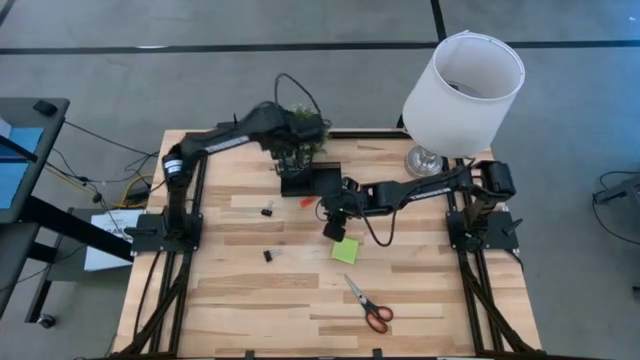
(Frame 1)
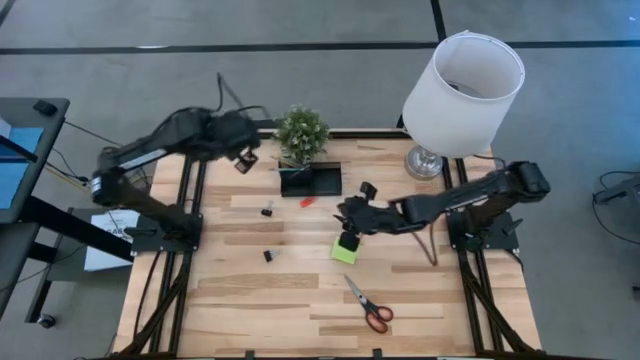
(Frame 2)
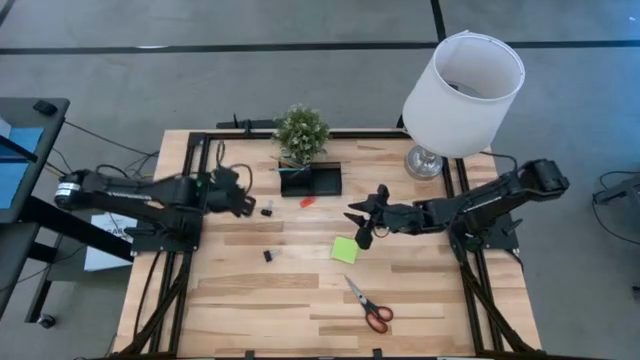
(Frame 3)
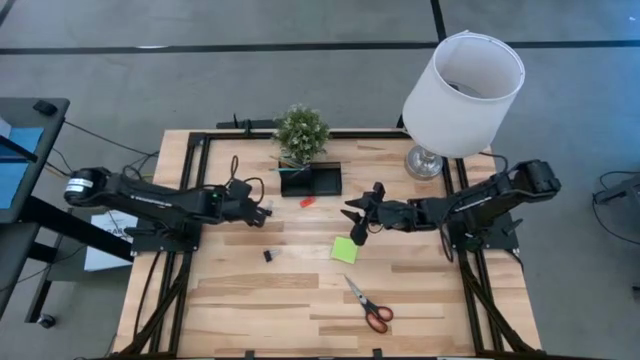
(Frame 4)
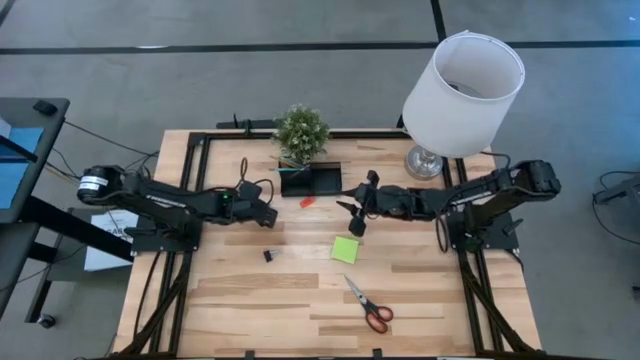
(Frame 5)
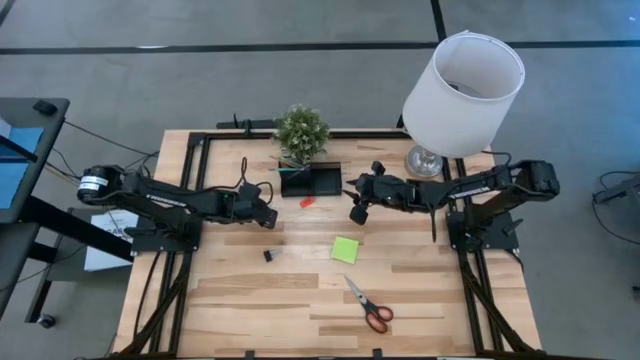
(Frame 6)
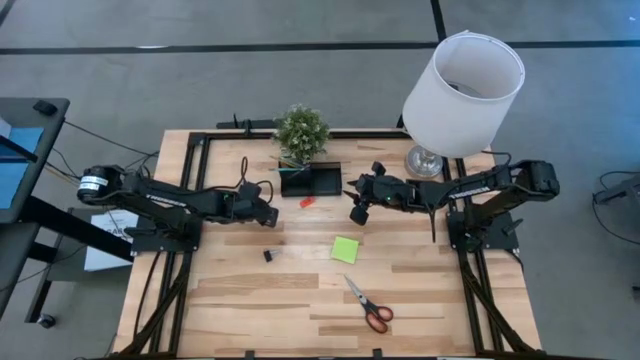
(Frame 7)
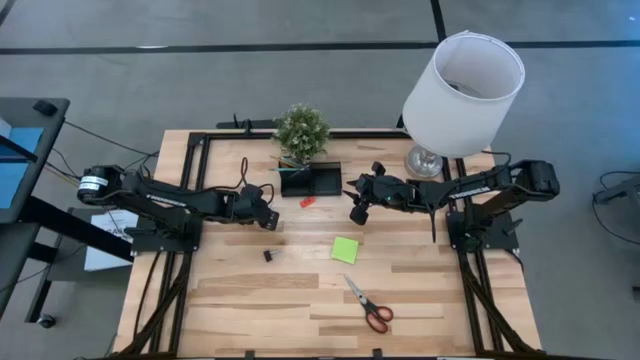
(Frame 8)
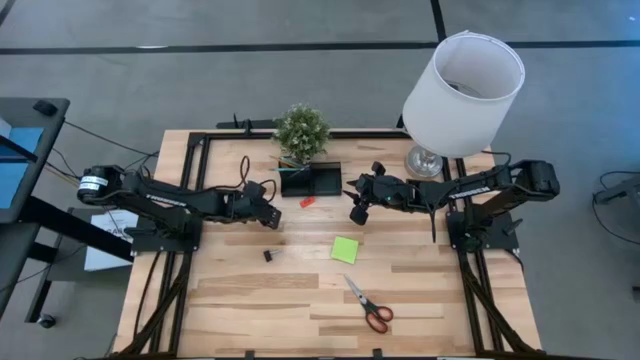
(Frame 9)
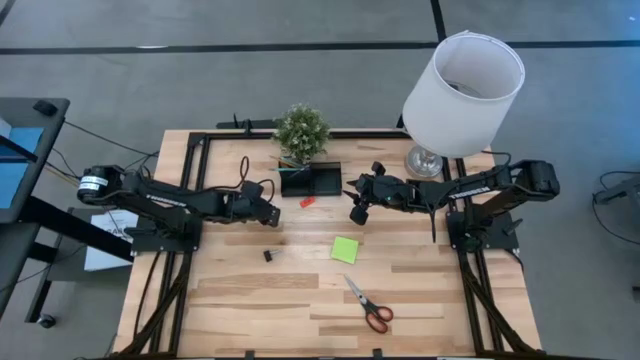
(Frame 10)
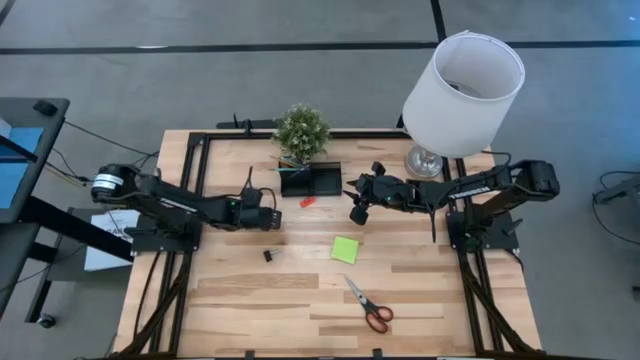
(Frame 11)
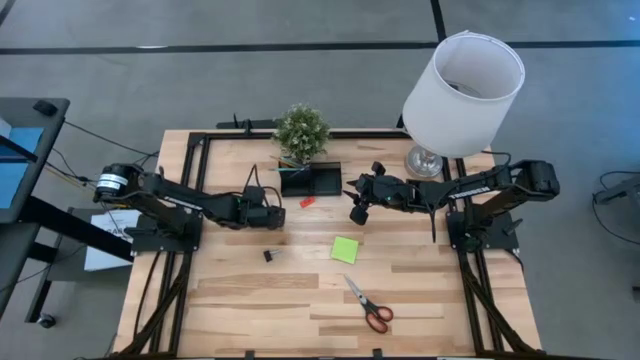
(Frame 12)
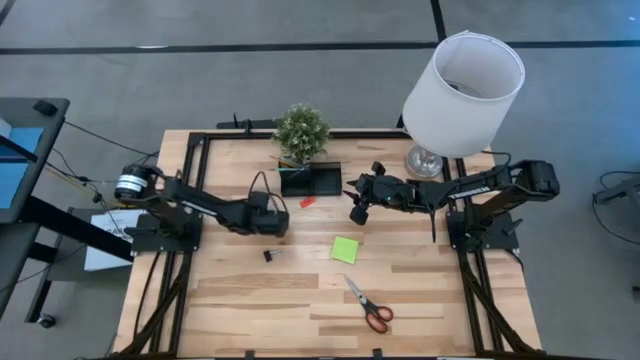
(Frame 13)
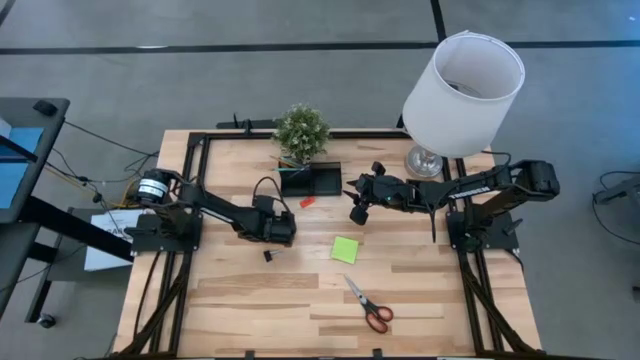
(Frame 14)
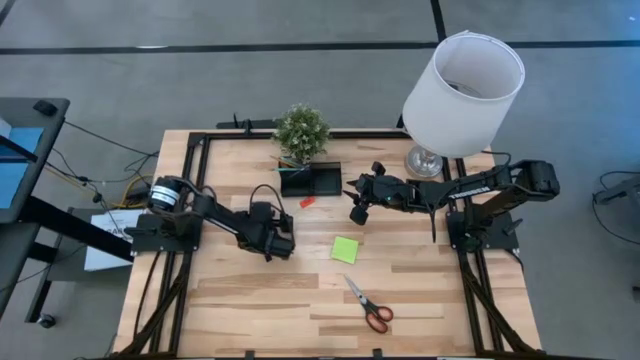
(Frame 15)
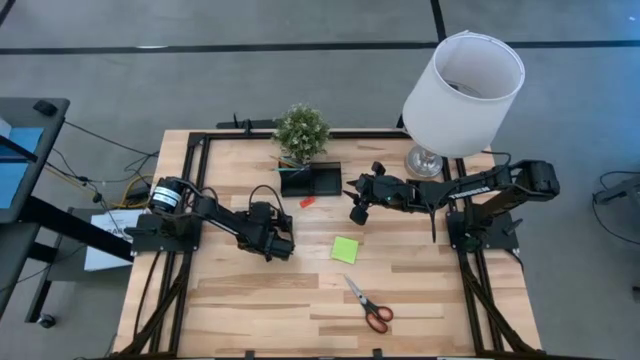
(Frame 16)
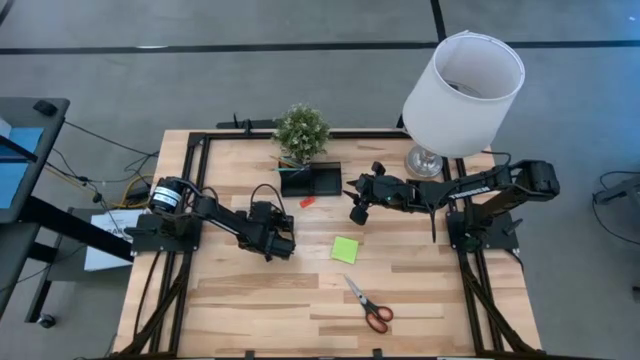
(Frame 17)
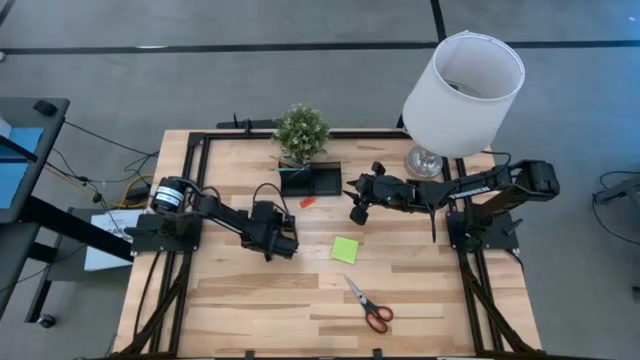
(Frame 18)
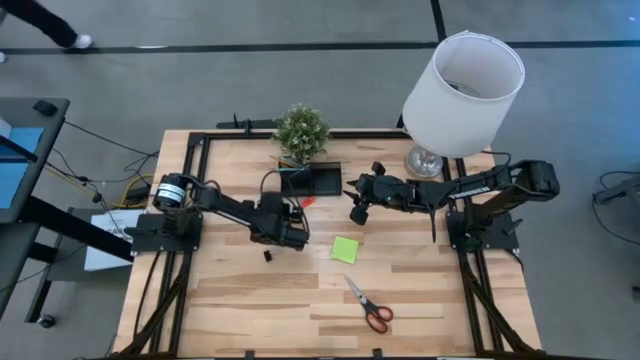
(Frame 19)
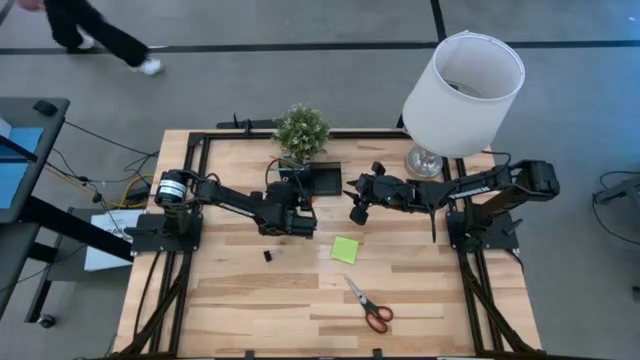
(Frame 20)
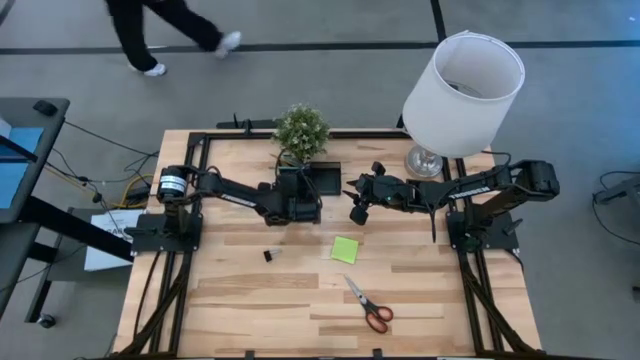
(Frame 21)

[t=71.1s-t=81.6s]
Task: Pick and place office supplies into organizer
Put the top black binder clip into the black organizer

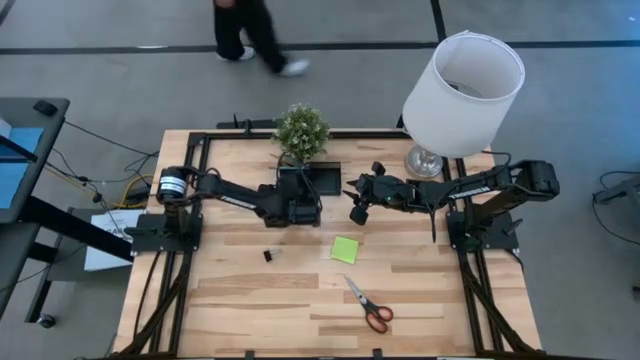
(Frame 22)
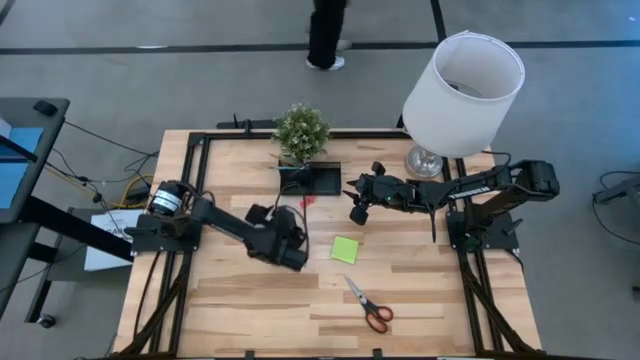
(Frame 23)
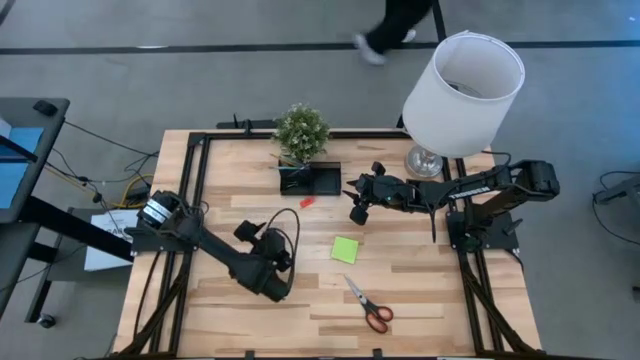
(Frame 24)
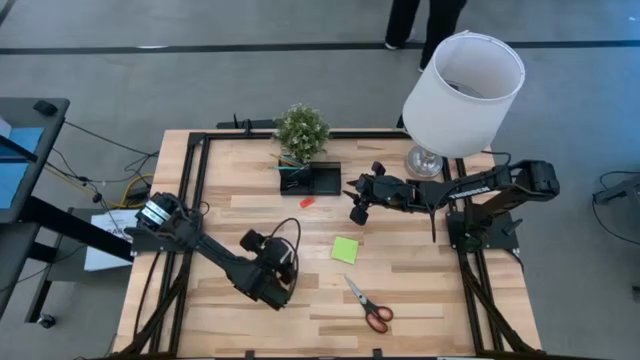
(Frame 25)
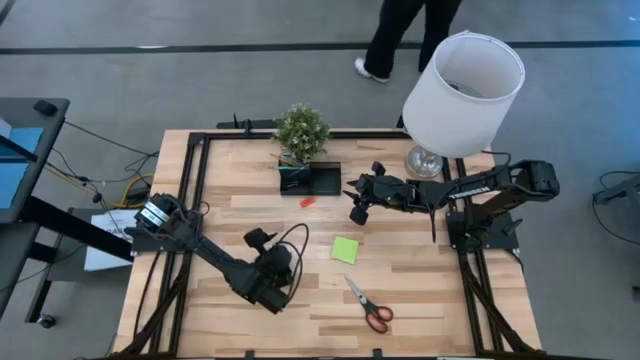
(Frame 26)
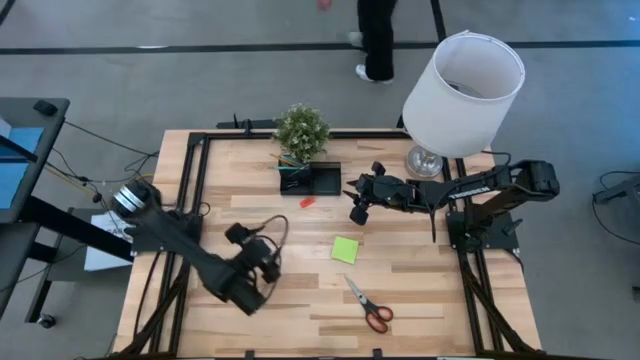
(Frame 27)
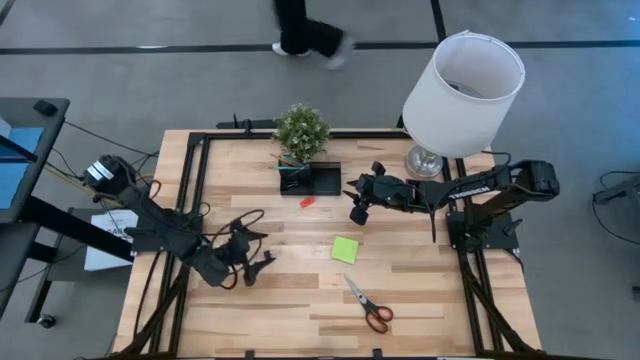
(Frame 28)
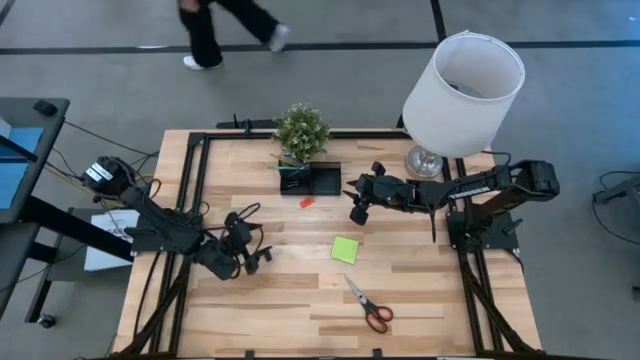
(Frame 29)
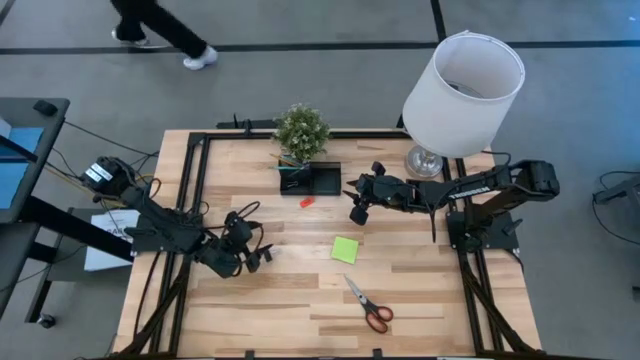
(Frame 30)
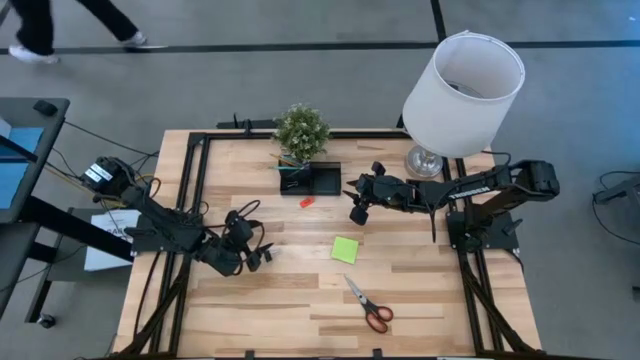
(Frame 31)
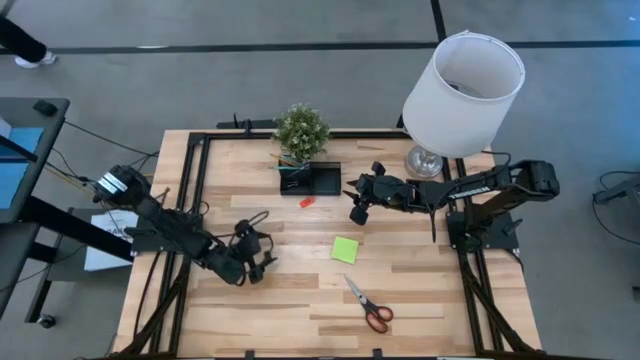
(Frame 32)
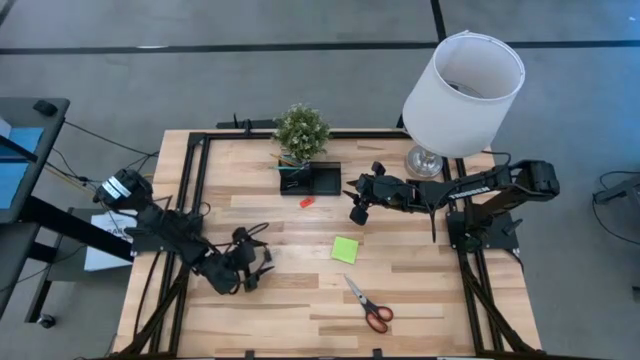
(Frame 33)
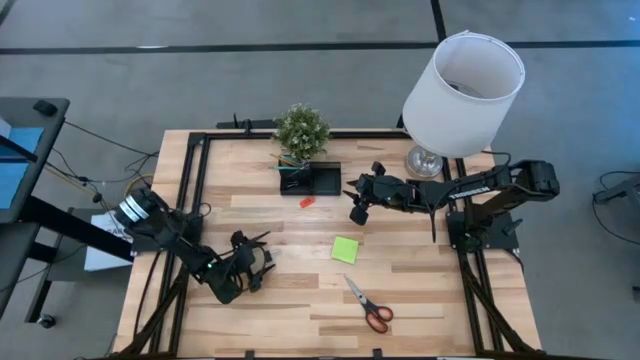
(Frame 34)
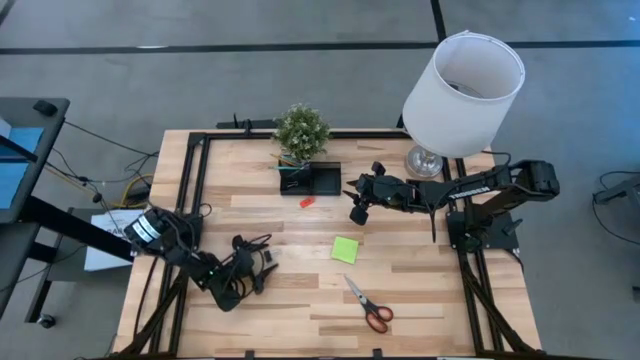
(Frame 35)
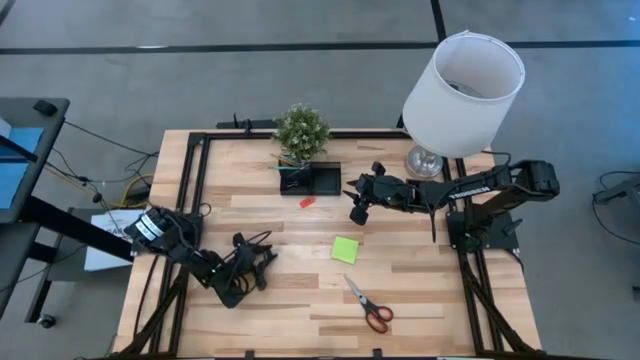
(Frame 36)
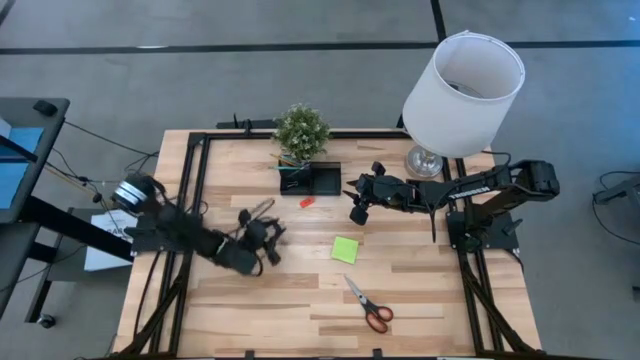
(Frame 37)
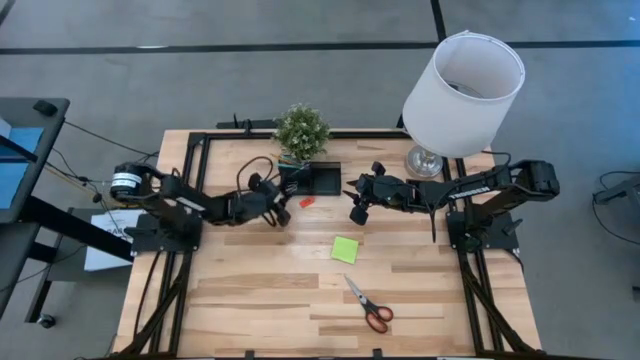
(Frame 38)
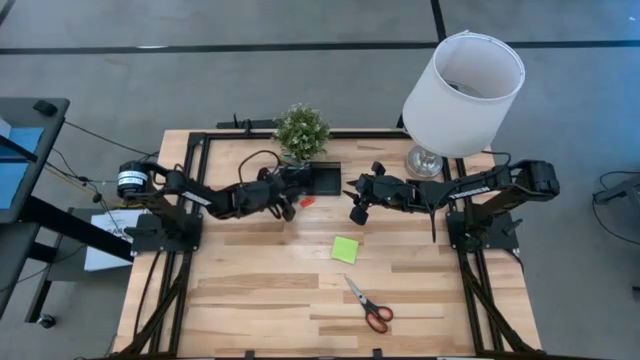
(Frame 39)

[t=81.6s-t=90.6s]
Put the black binder clip into the black organizer

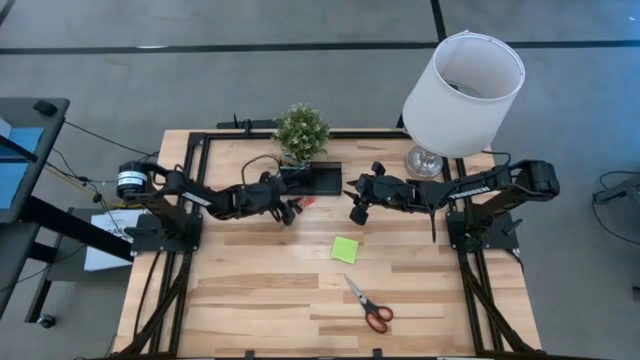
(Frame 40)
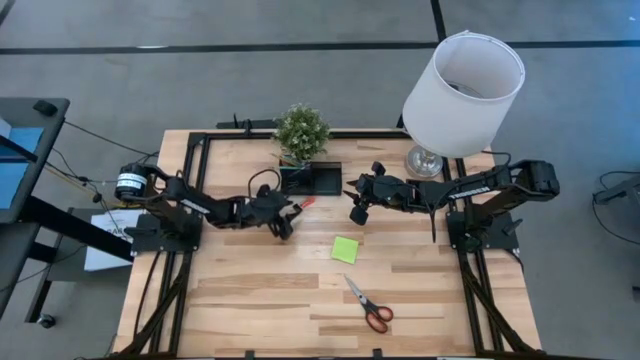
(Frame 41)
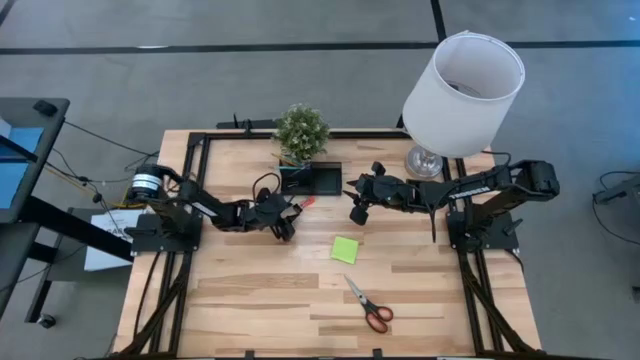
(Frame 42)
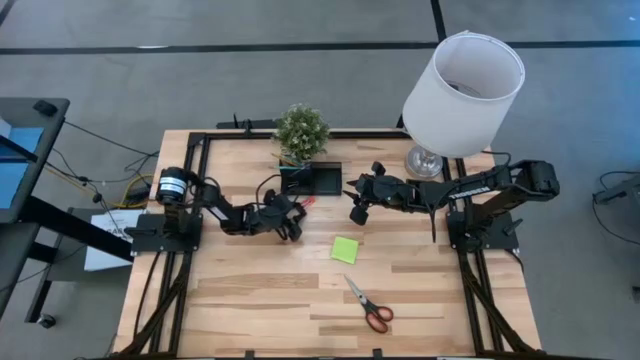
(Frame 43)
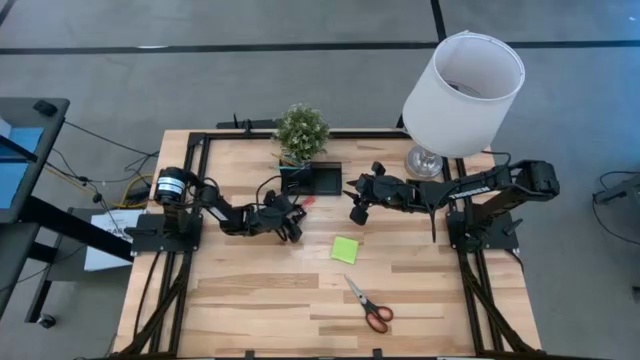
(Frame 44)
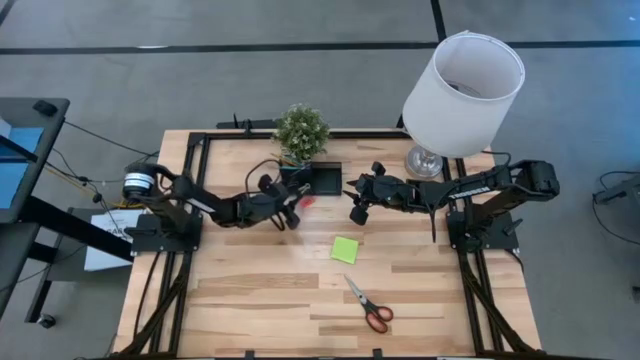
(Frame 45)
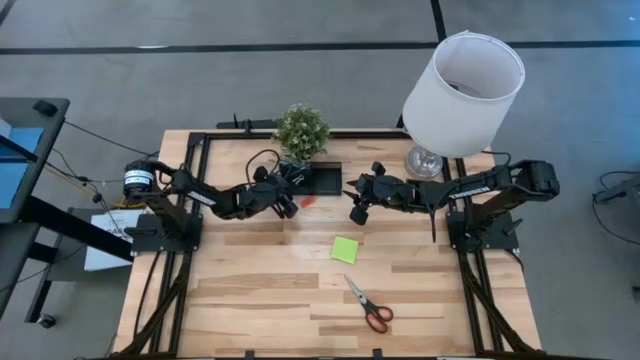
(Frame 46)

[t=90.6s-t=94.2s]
Put the black binder clip into the black organizer
